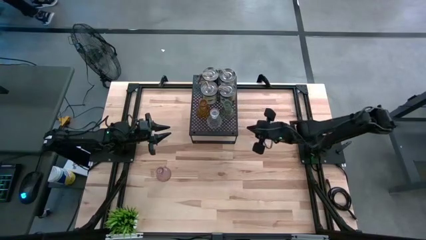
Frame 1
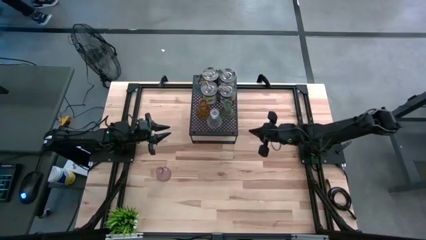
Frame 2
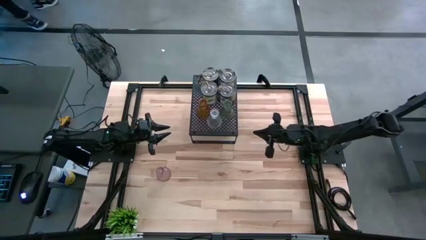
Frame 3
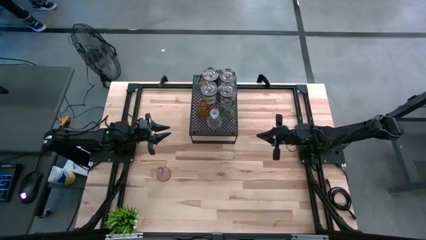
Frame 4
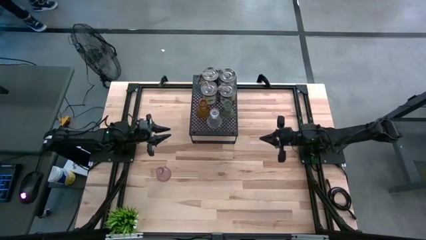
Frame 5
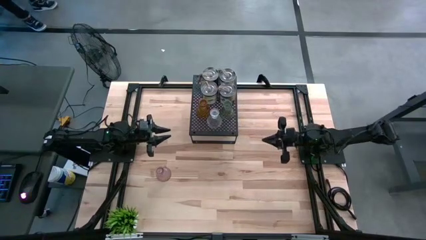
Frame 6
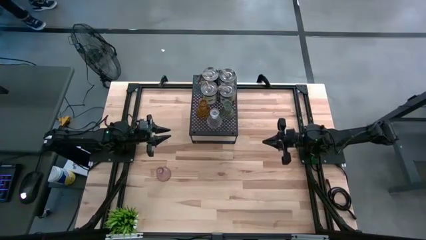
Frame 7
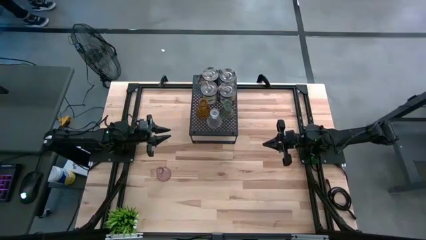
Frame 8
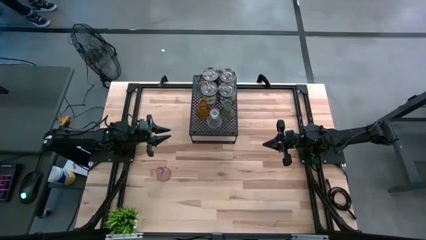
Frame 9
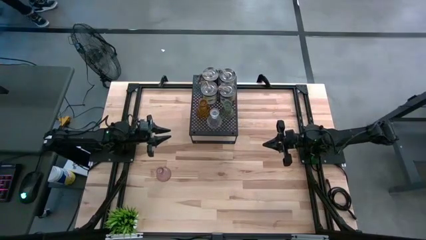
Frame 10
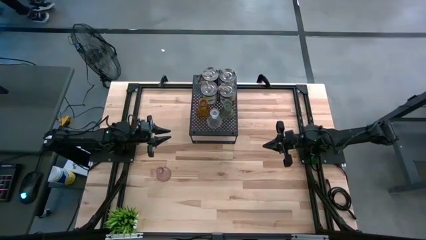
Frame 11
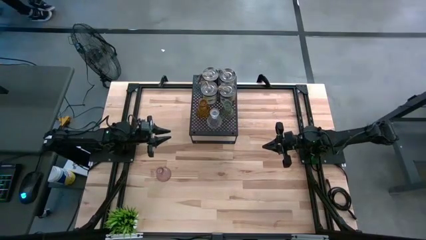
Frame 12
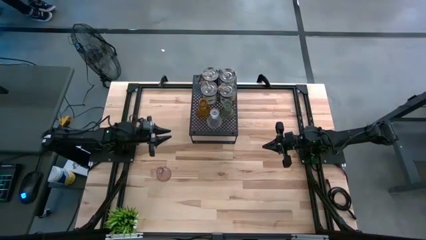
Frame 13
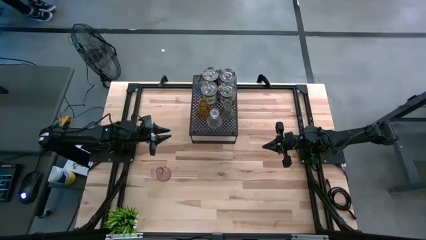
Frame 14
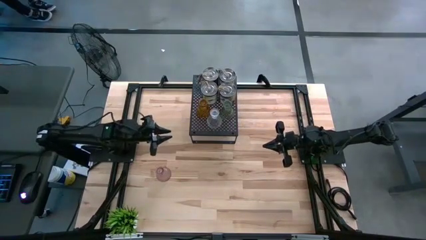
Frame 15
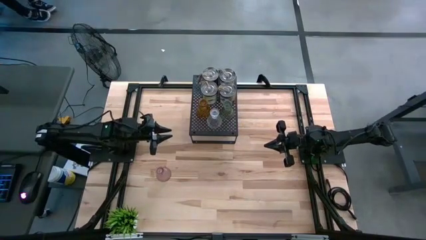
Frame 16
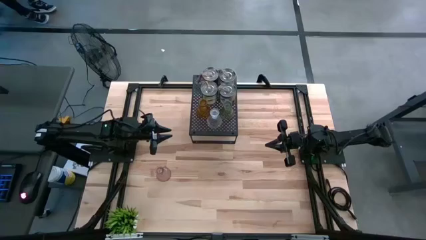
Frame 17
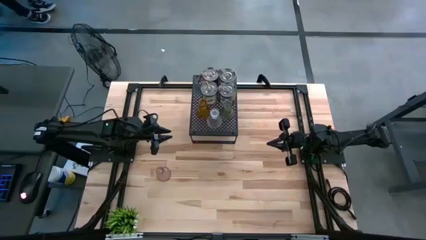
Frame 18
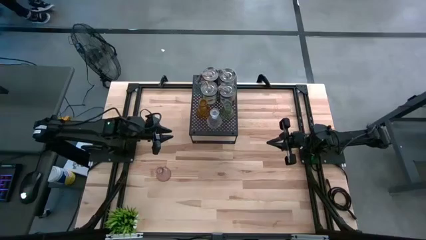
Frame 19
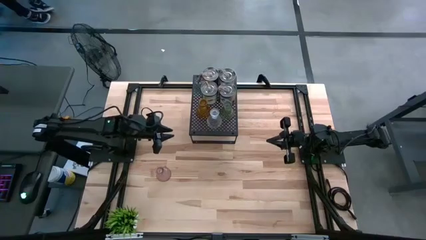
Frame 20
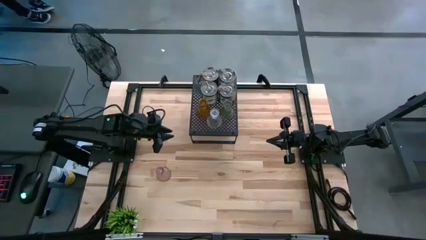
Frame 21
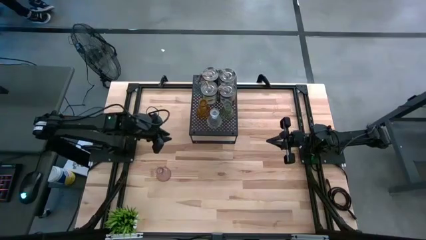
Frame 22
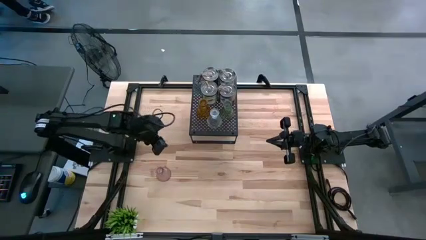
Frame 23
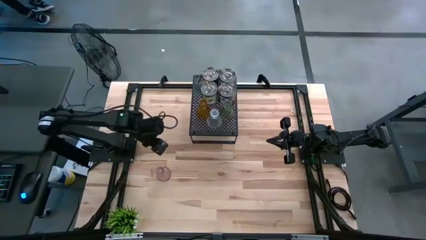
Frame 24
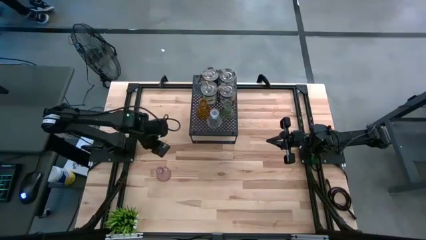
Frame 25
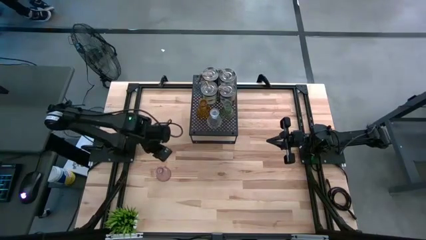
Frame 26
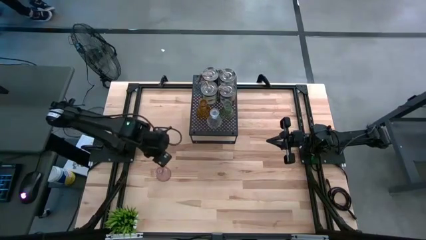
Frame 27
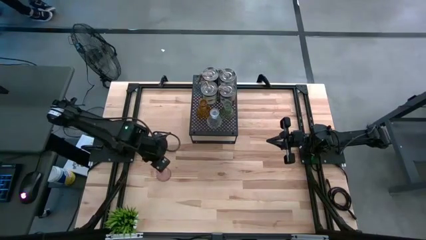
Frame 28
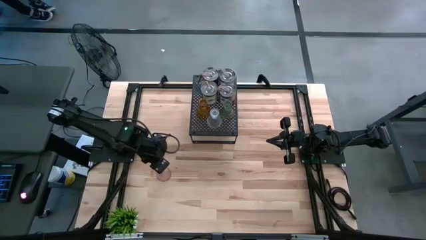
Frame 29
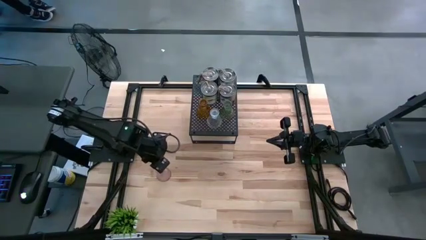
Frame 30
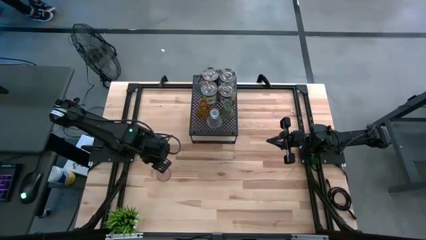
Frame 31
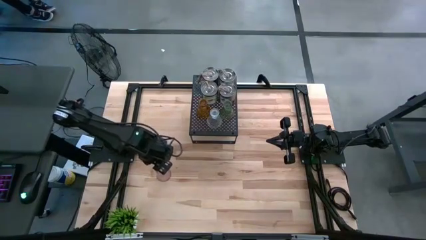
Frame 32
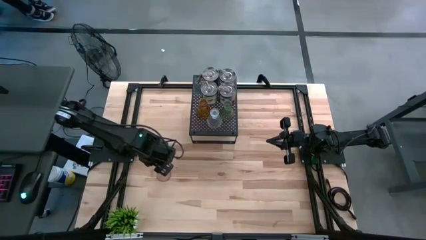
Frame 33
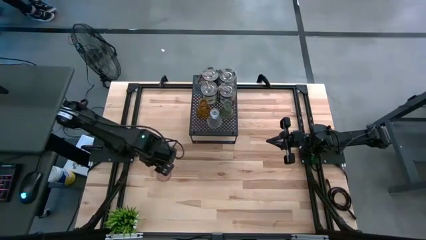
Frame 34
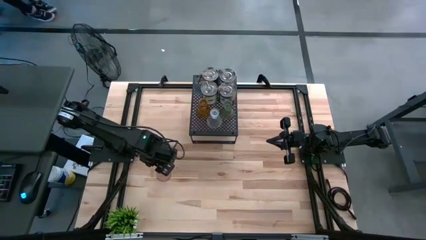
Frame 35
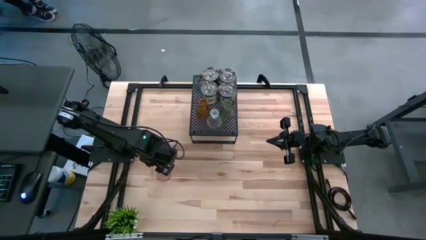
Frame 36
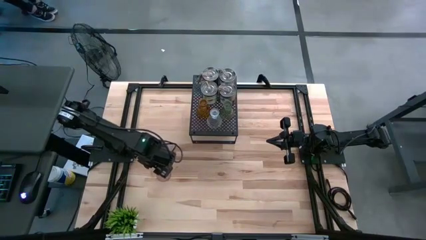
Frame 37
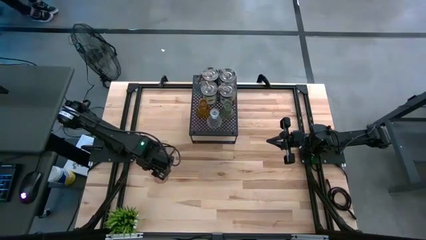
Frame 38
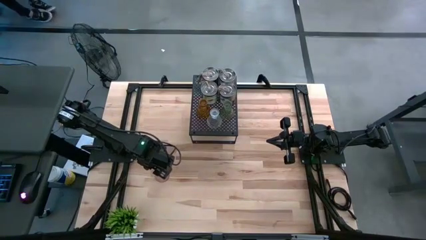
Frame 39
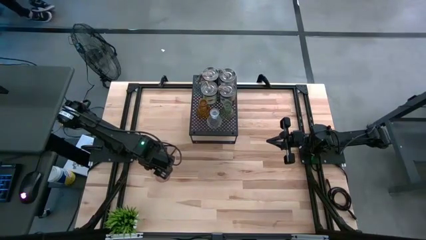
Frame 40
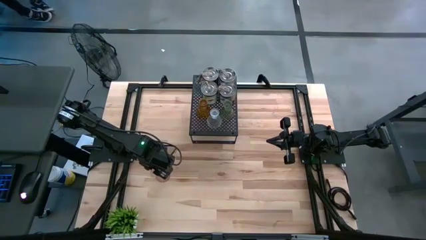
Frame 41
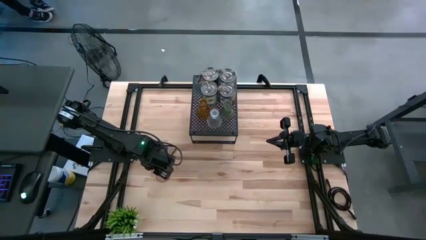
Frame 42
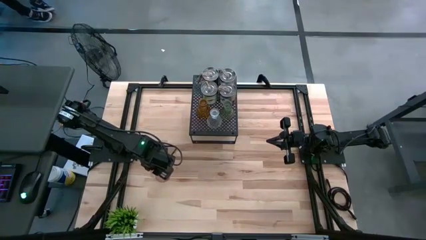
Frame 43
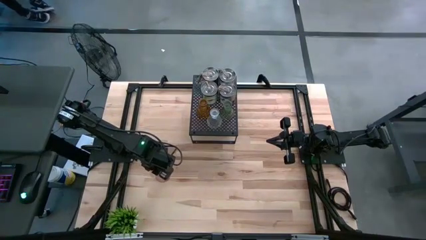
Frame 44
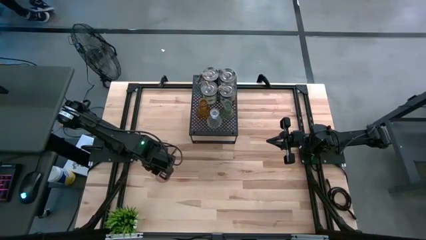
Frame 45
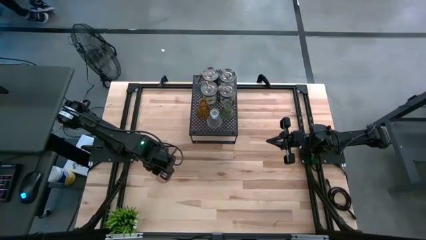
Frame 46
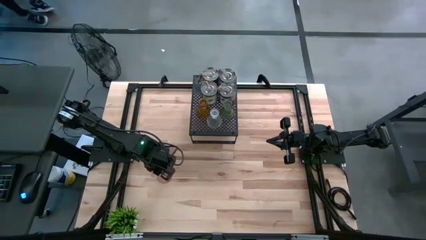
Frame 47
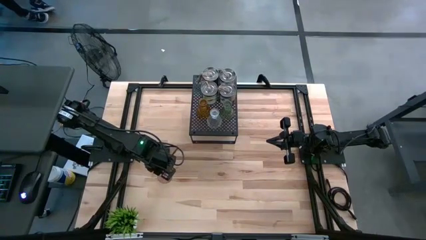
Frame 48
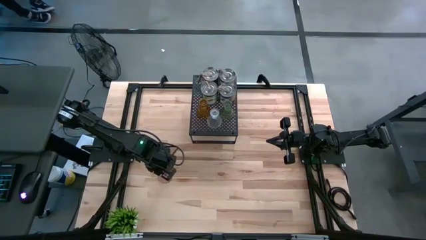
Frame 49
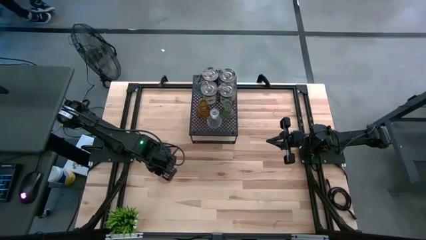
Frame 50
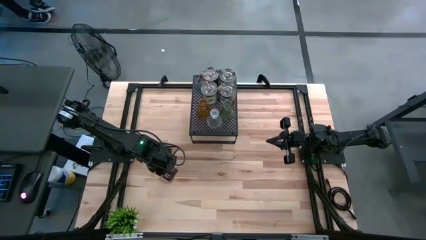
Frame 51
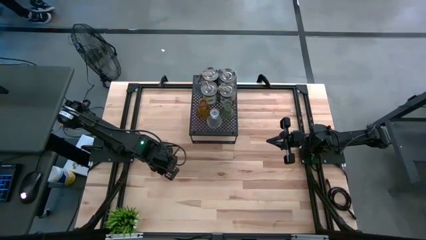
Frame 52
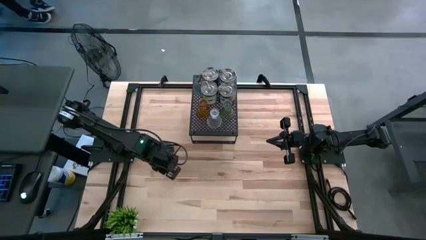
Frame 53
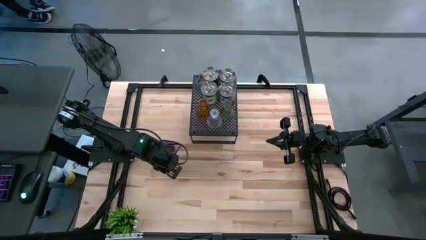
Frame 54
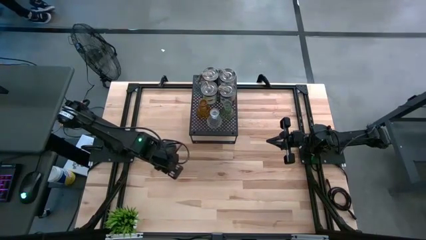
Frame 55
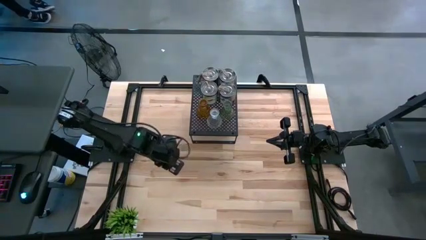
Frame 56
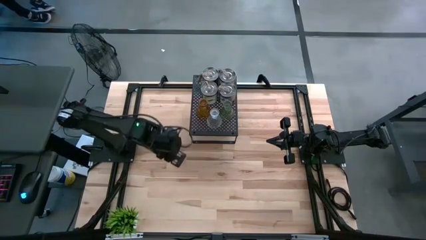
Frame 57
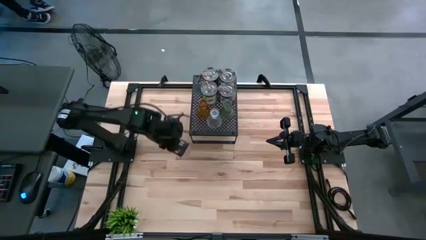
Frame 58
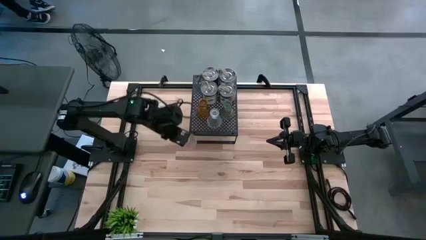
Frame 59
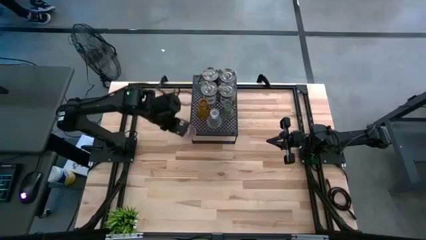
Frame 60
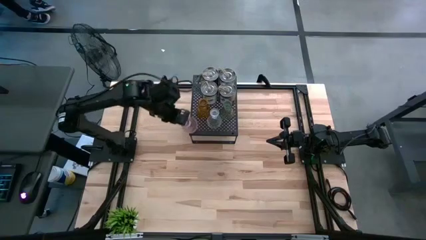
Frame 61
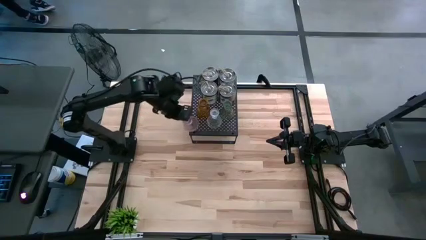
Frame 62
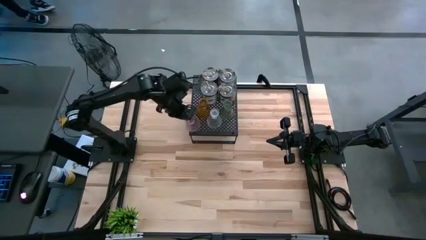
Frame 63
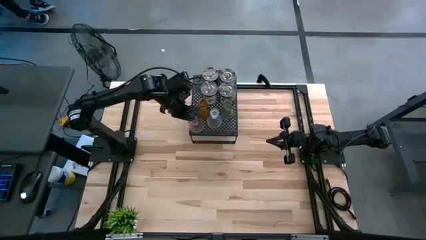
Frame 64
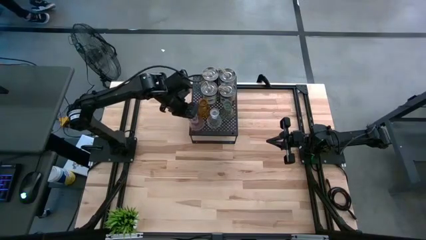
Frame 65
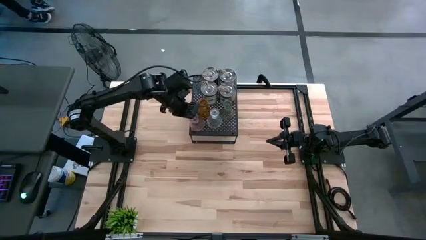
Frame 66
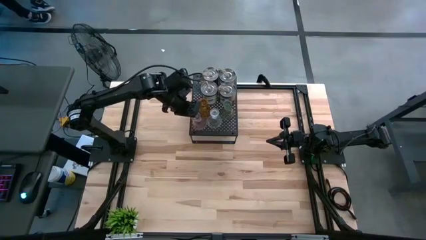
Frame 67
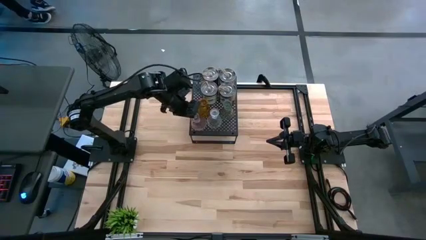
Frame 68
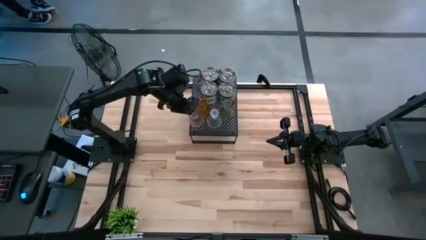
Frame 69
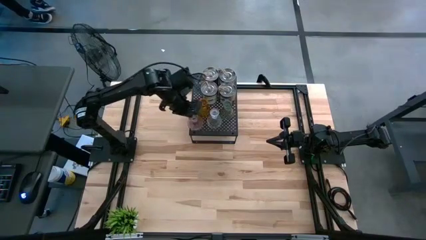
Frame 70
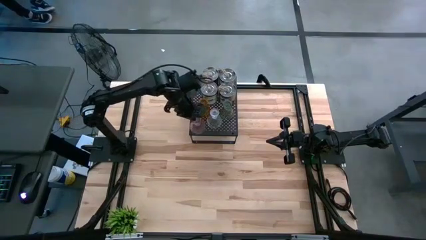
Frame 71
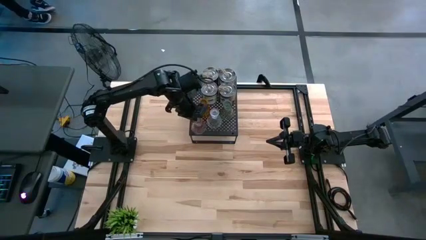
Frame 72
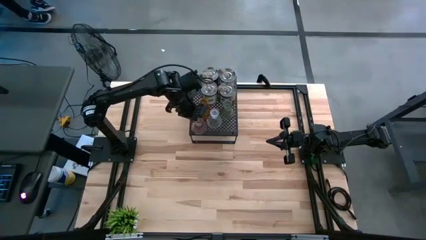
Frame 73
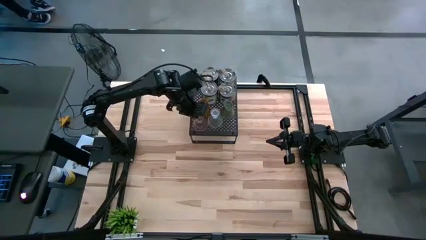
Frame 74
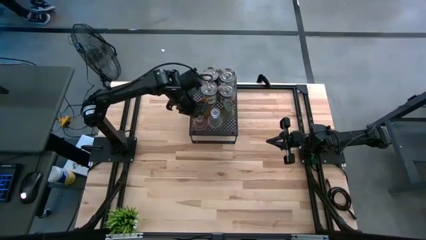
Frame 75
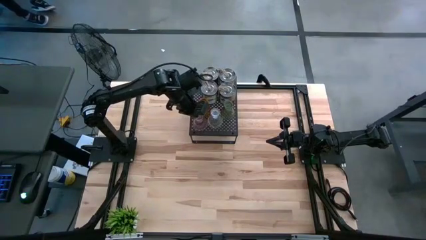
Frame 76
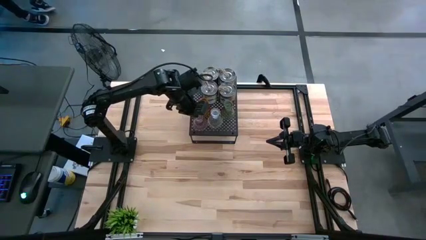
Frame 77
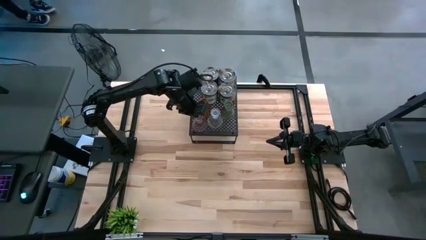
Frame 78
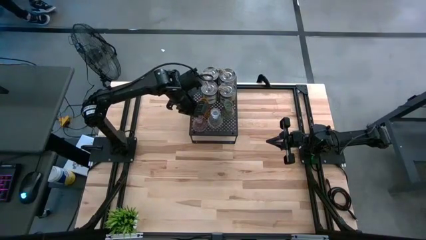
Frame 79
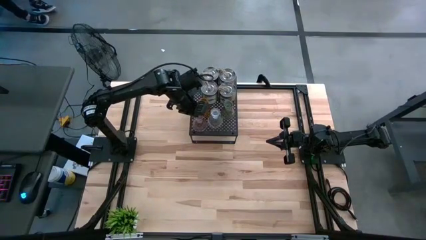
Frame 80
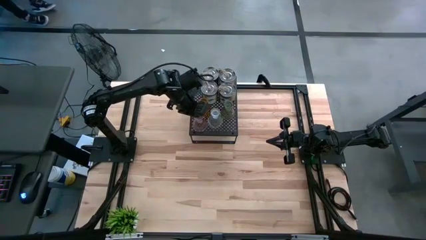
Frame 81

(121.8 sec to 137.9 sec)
Task: Pick & Place candle stick holders
Put the pink candle holder on the black shelf

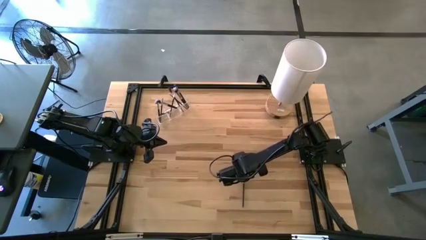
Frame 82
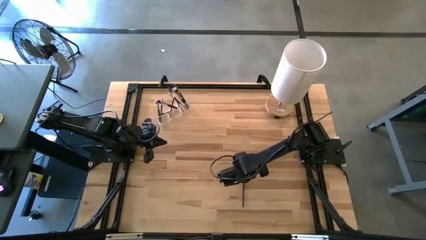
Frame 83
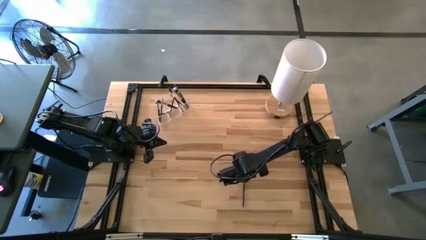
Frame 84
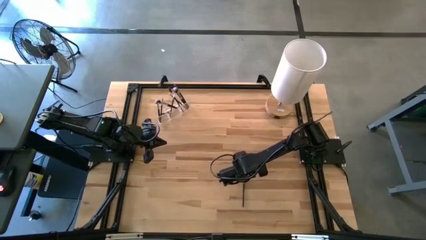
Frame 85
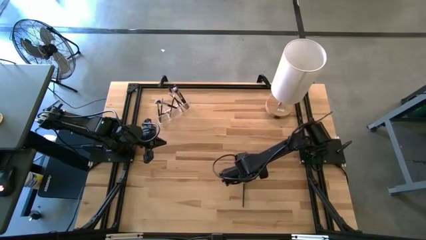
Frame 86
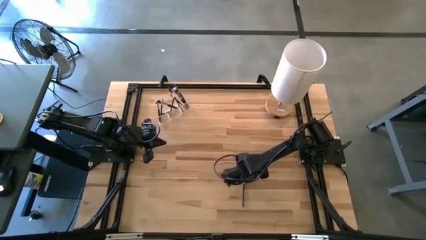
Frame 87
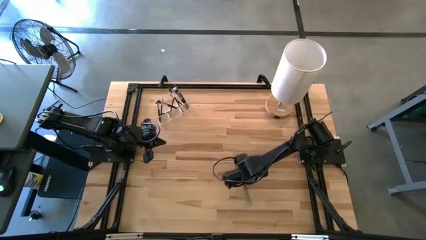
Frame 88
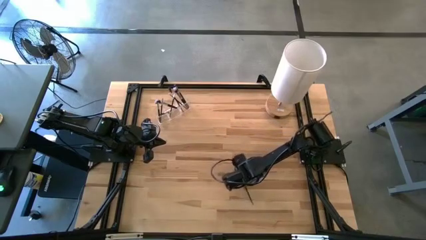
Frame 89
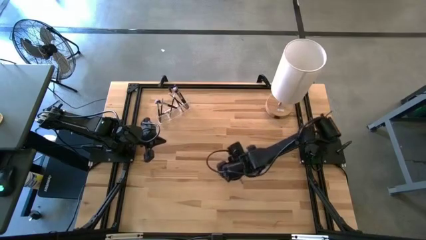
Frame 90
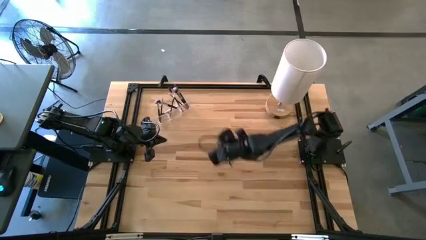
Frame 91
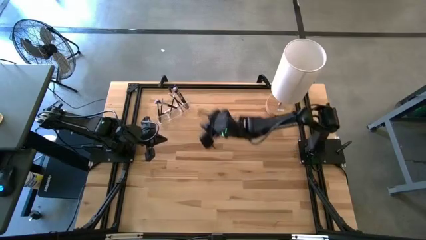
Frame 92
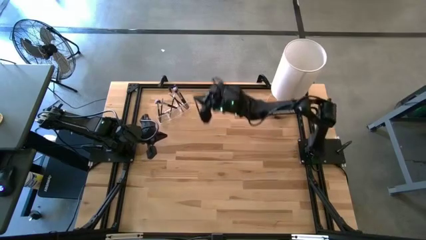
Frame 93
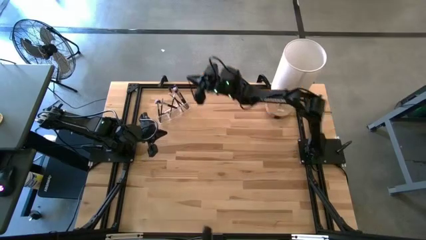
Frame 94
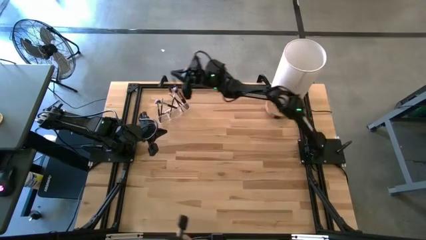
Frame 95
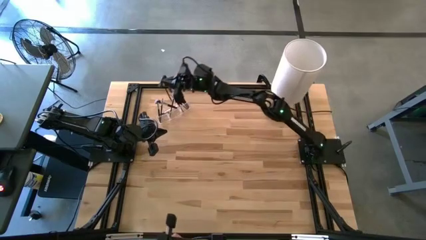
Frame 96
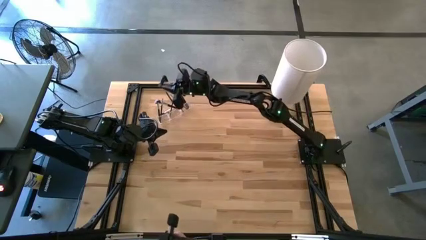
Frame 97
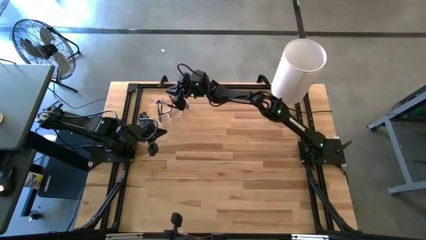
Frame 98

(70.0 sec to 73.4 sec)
Task: Put items in baskets/containers
Put the eyeshadow brush into the transparent organizer
